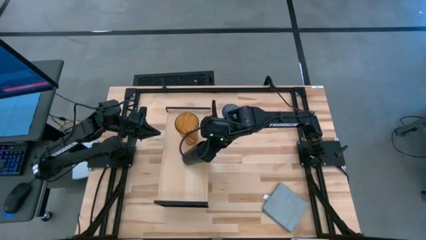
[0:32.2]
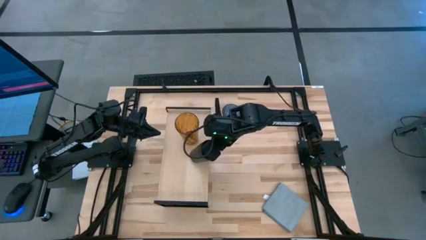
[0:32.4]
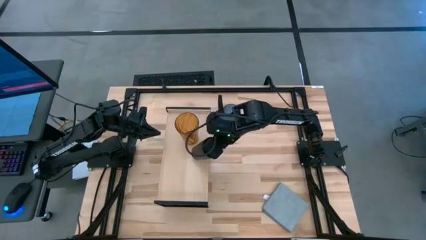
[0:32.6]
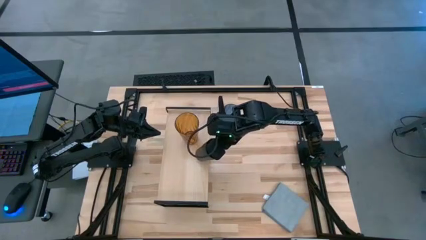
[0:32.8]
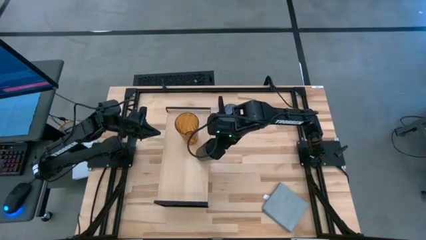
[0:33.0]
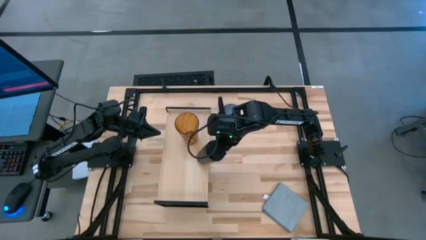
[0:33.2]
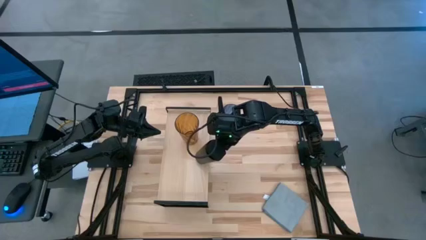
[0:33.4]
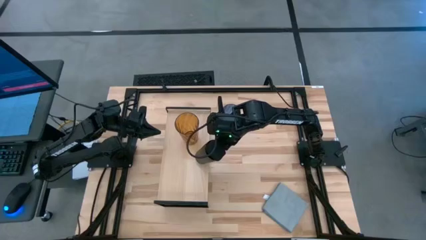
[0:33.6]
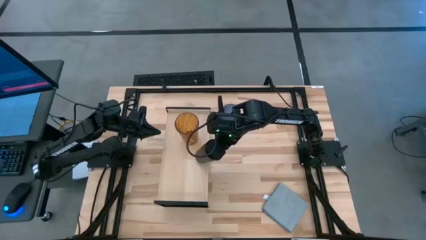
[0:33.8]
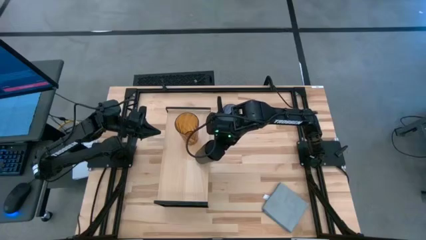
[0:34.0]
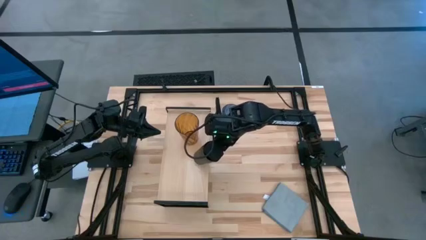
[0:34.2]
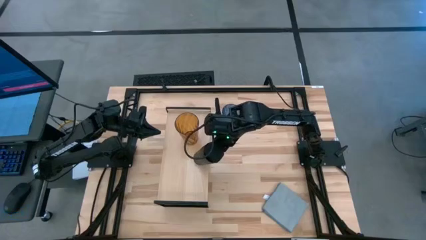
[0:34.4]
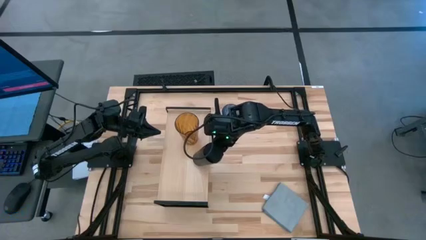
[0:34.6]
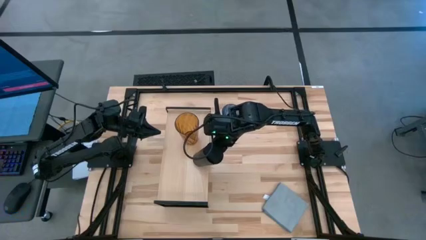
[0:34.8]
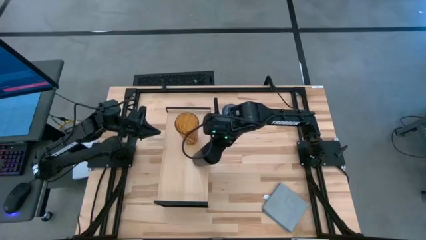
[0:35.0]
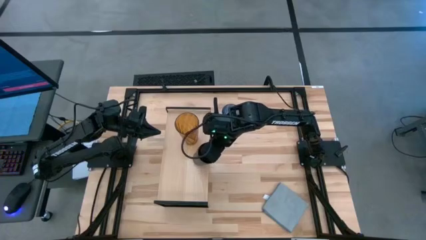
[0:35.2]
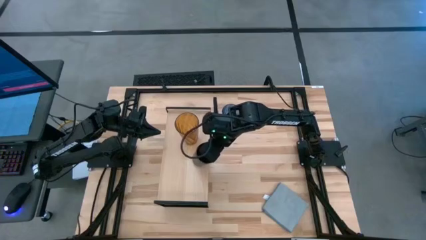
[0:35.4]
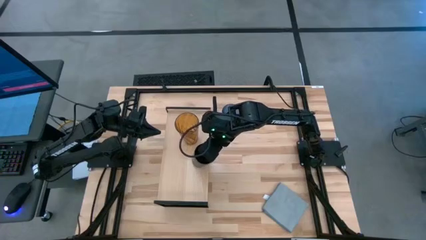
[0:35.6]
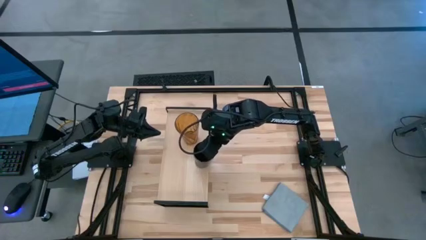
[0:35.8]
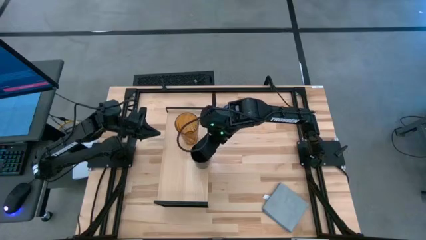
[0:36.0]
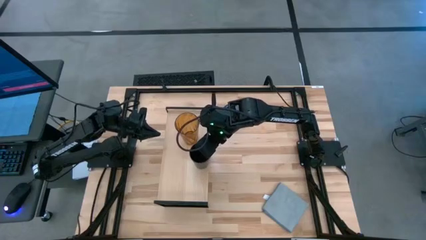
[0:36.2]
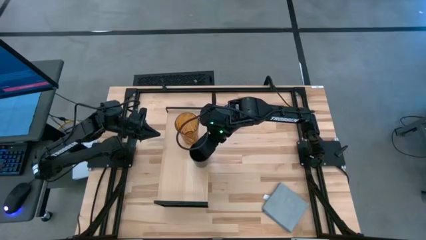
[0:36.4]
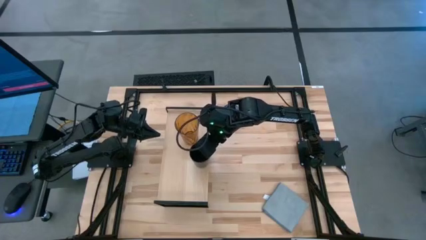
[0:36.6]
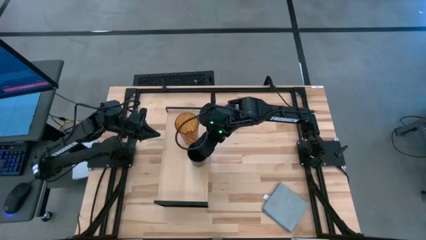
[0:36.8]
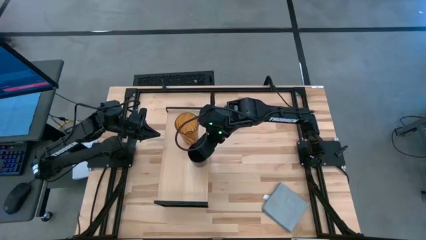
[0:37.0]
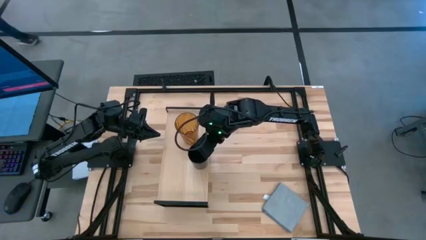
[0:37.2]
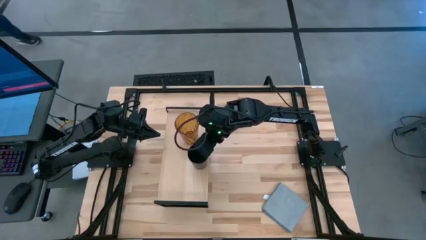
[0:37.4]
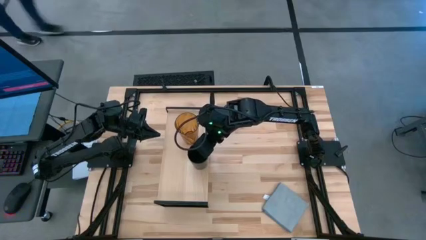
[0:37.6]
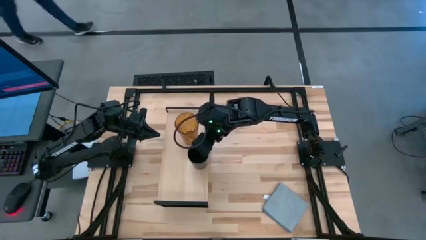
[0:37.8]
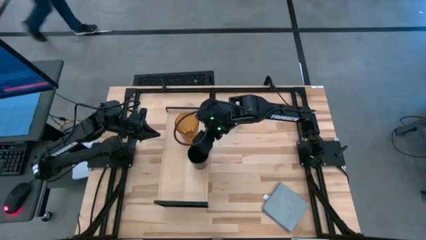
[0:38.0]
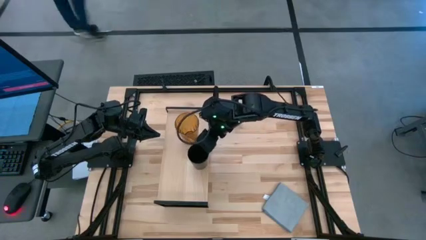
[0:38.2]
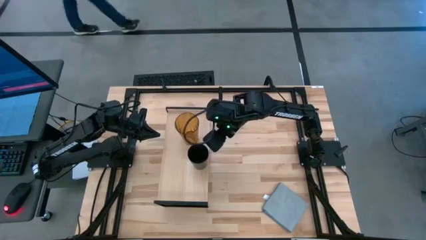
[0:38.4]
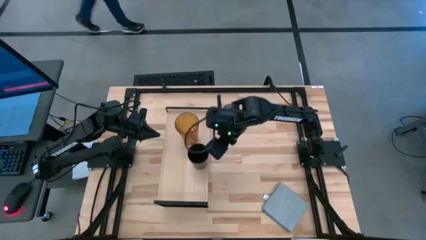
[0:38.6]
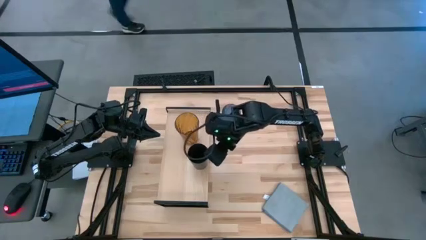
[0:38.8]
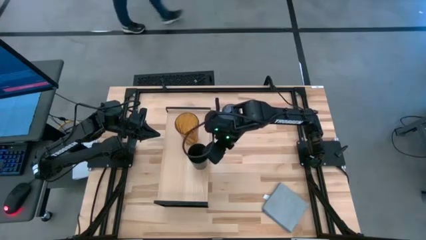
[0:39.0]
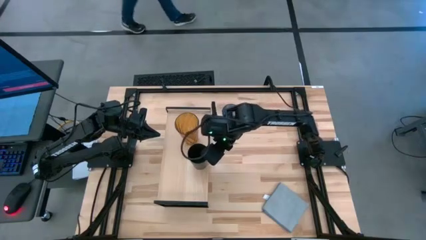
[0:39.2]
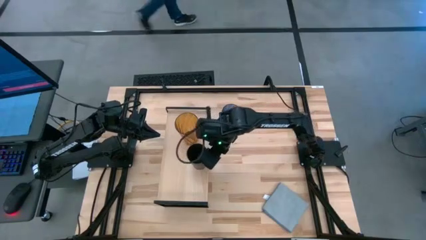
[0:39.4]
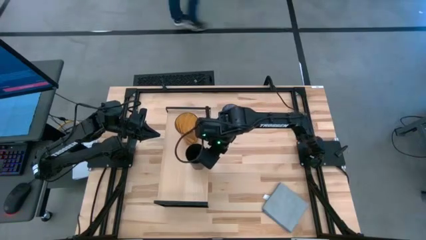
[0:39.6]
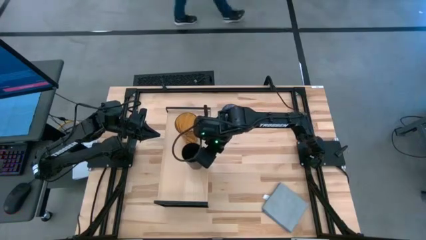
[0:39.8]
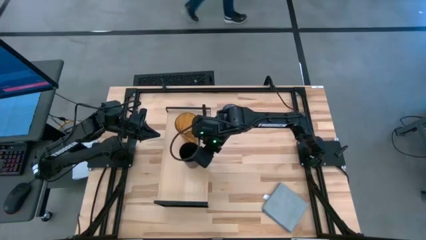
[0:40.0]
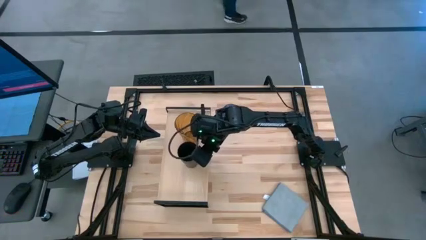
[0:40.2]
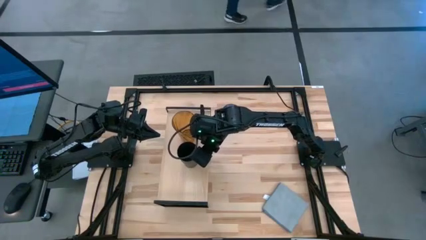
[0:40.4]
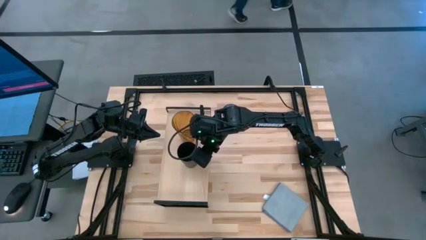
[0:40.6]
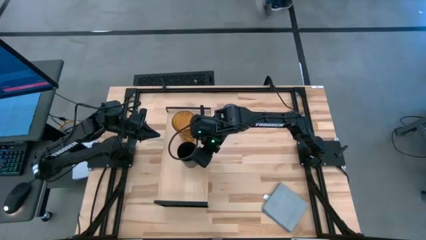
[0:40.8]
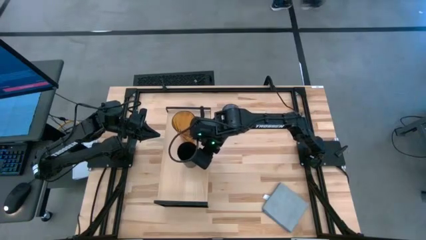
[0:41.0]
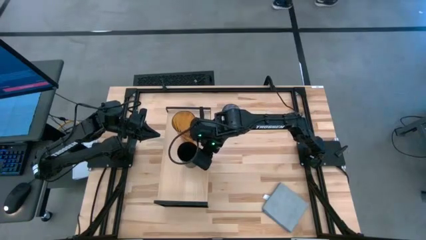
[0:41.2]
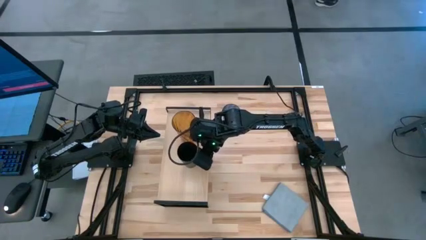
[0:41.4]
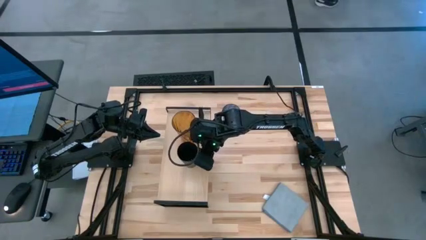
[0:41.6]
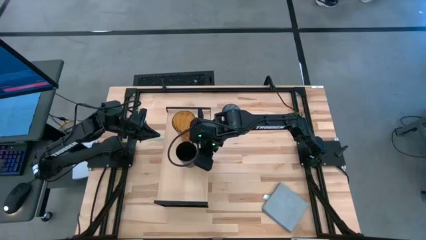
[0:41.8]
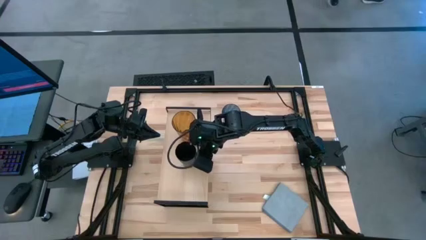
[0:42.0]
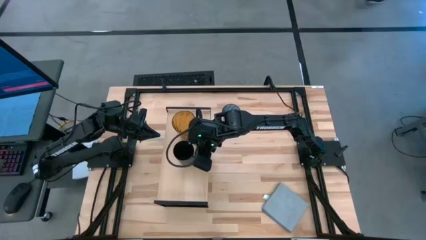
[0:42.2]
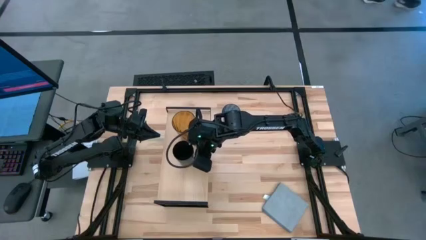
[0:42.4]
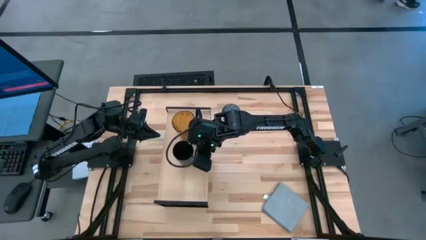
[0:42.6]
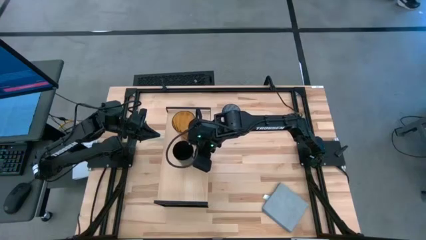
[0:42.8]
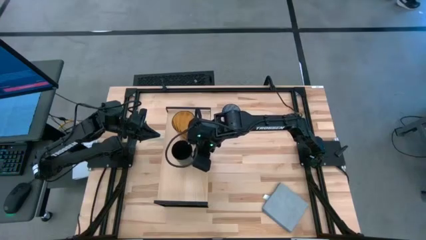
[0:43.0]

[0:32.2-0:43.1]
Task: Stack small to large cups/mugs on shelf
Put the black cup on the shelf
